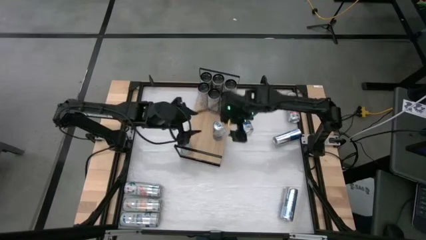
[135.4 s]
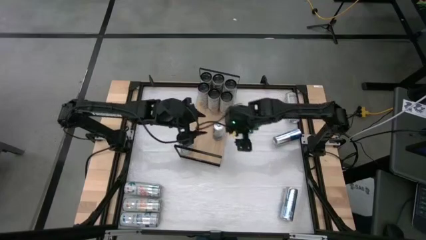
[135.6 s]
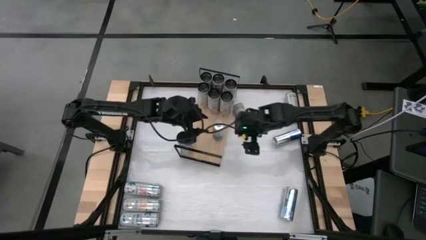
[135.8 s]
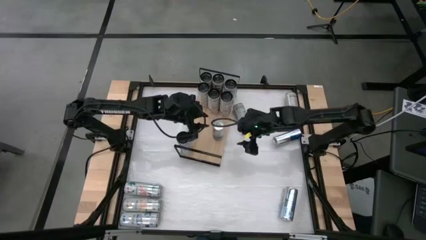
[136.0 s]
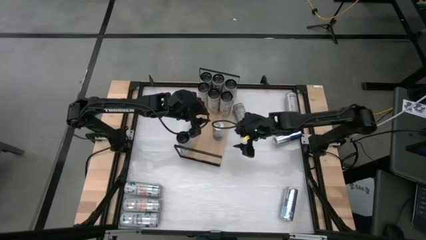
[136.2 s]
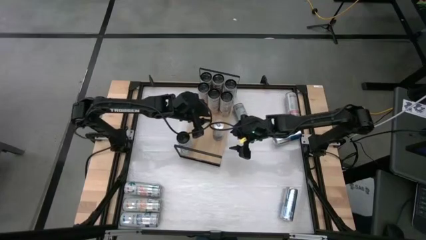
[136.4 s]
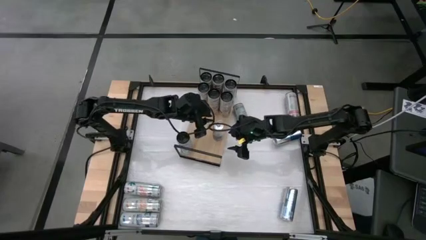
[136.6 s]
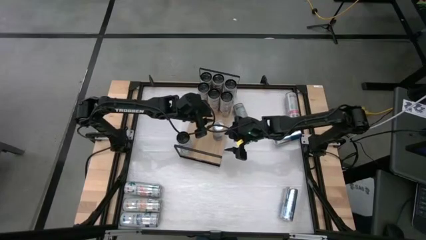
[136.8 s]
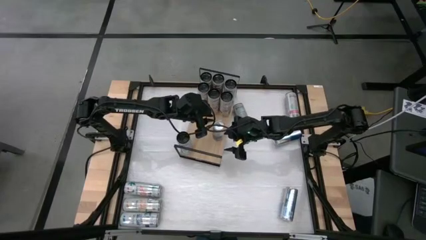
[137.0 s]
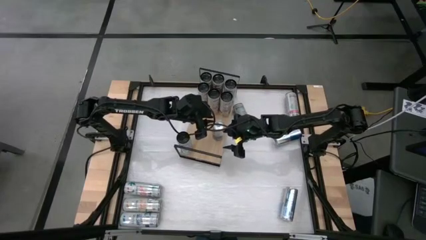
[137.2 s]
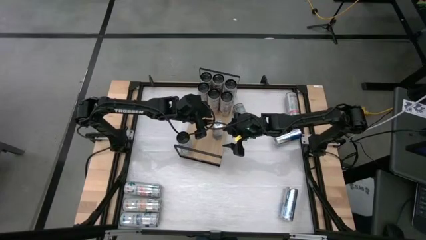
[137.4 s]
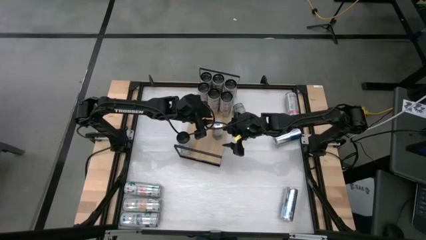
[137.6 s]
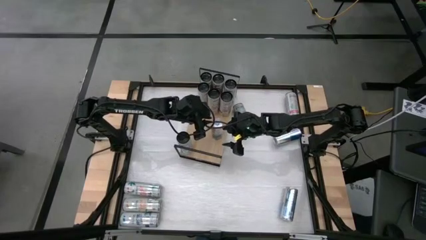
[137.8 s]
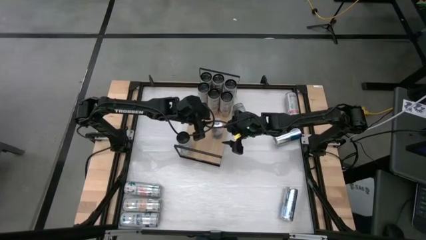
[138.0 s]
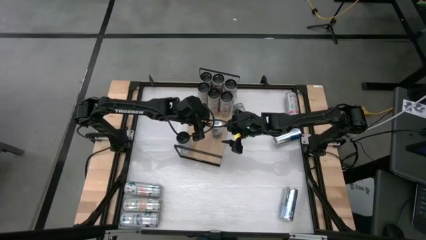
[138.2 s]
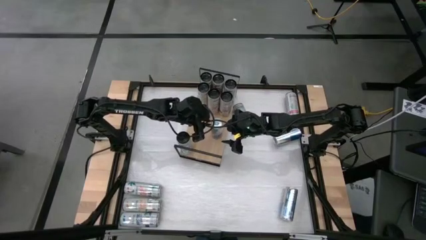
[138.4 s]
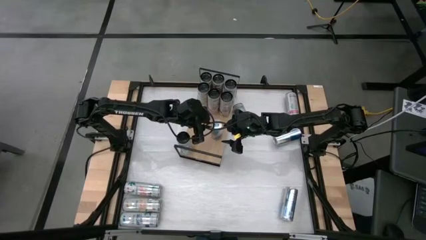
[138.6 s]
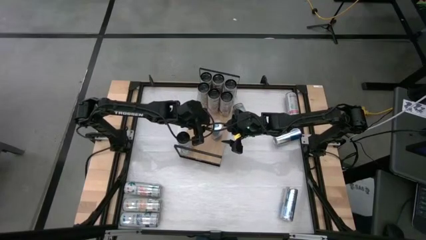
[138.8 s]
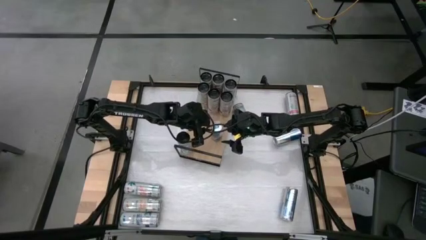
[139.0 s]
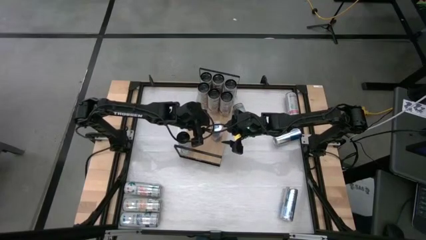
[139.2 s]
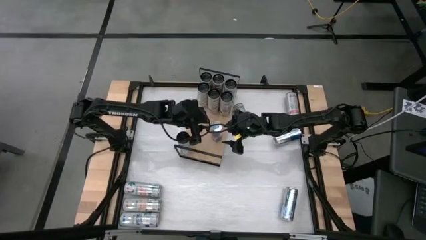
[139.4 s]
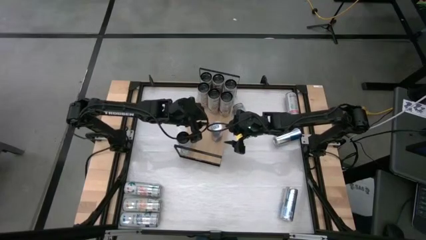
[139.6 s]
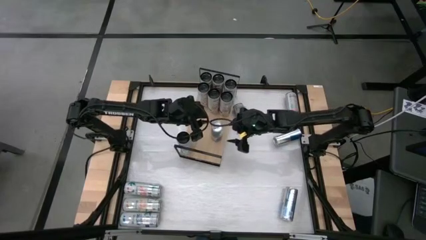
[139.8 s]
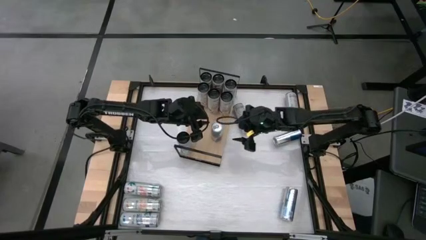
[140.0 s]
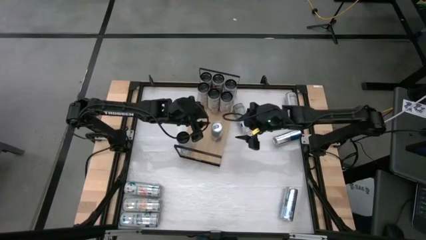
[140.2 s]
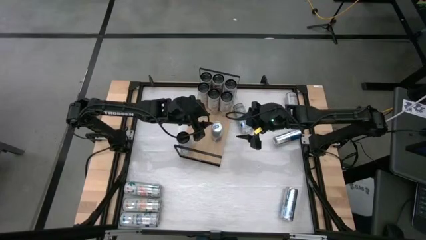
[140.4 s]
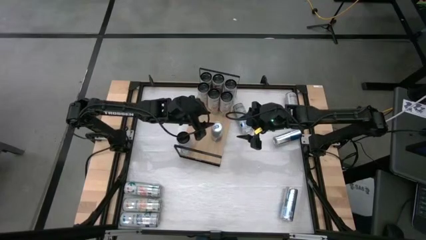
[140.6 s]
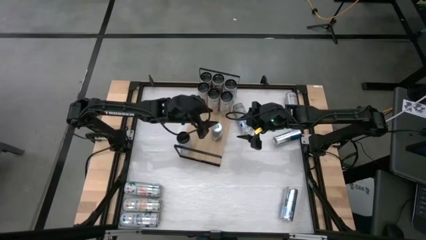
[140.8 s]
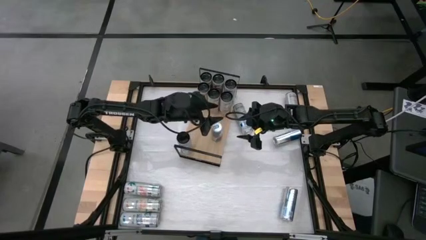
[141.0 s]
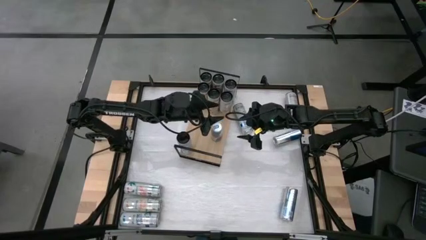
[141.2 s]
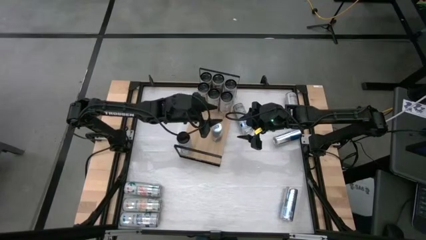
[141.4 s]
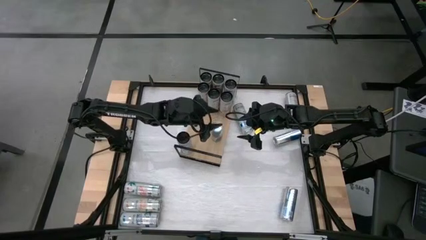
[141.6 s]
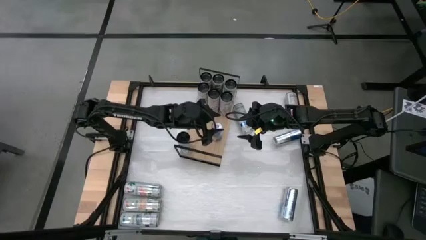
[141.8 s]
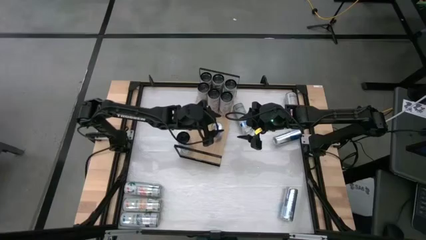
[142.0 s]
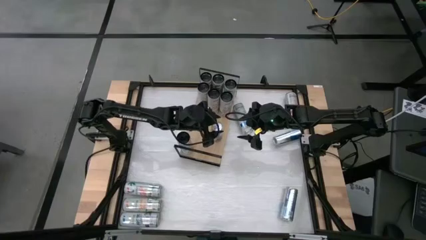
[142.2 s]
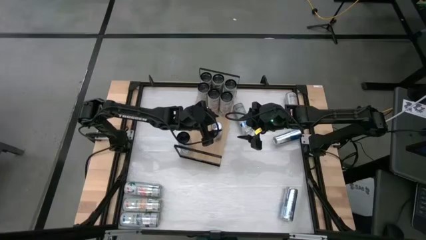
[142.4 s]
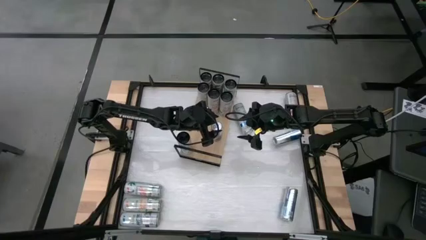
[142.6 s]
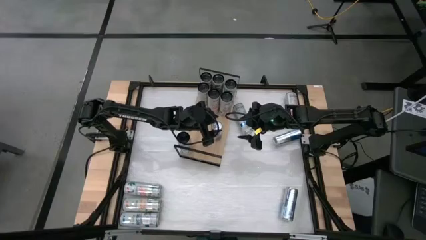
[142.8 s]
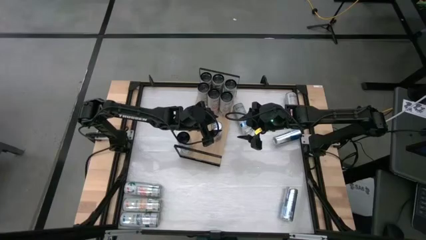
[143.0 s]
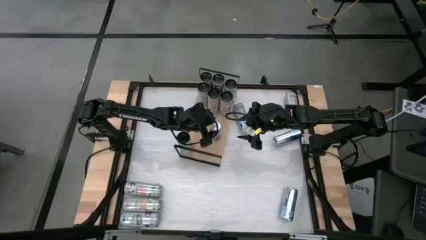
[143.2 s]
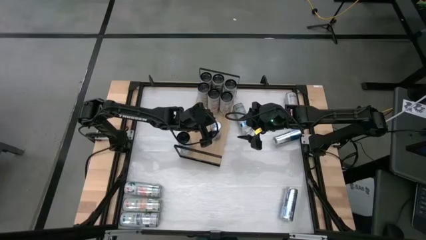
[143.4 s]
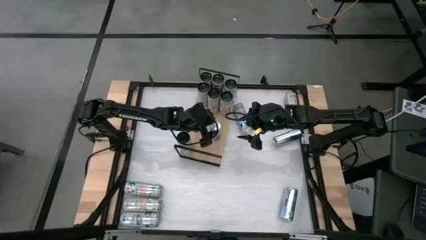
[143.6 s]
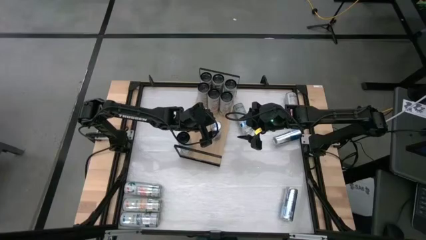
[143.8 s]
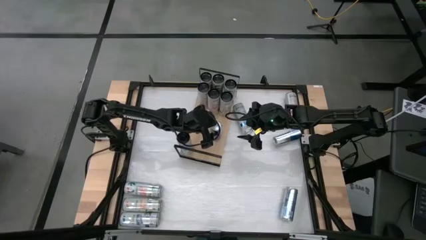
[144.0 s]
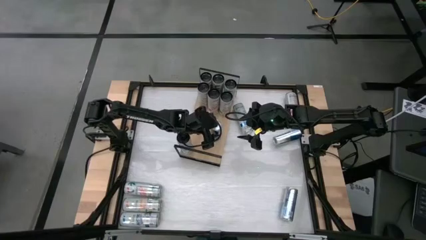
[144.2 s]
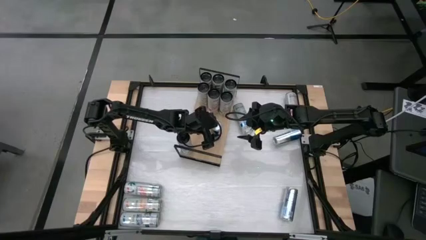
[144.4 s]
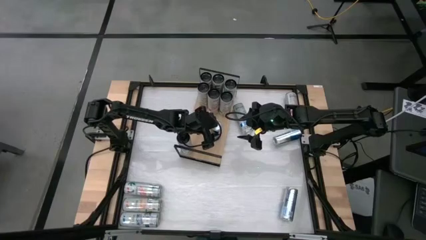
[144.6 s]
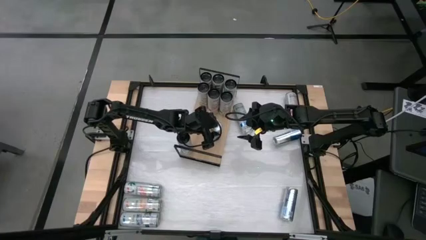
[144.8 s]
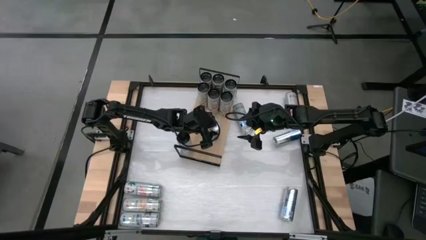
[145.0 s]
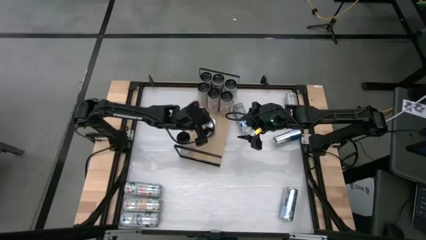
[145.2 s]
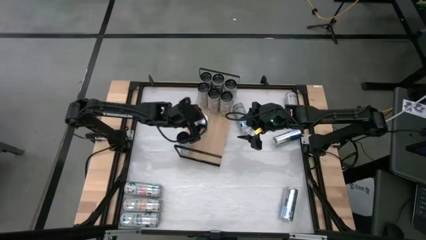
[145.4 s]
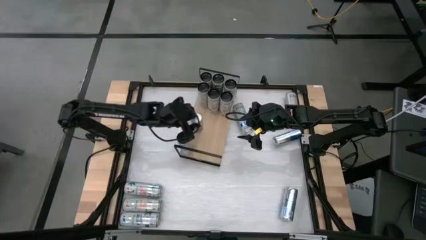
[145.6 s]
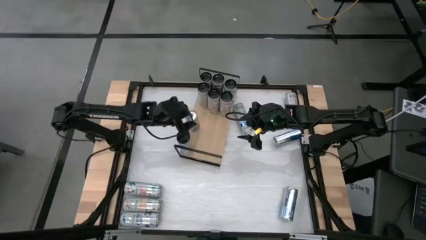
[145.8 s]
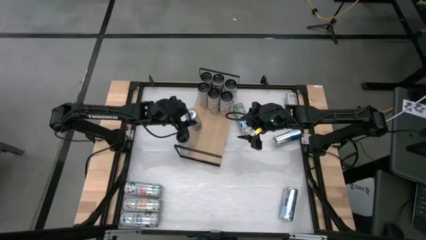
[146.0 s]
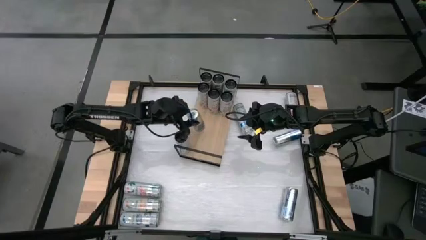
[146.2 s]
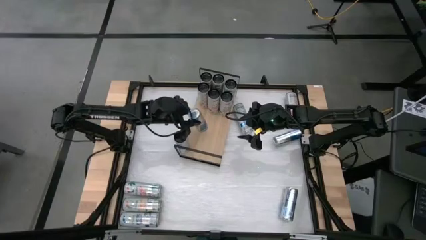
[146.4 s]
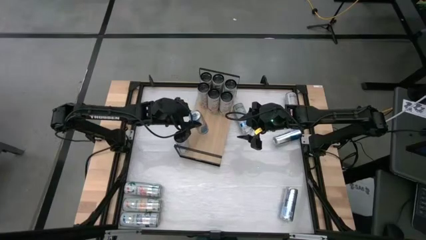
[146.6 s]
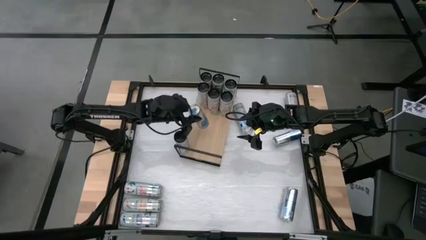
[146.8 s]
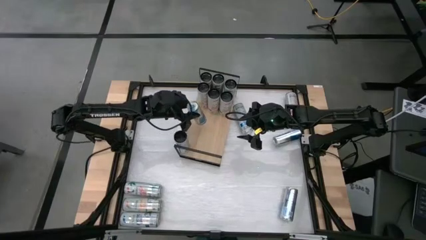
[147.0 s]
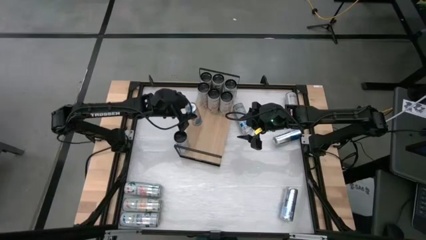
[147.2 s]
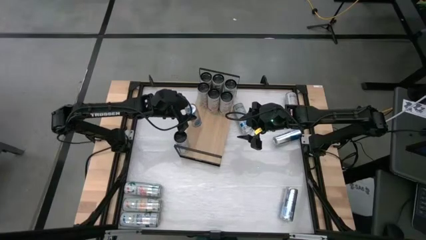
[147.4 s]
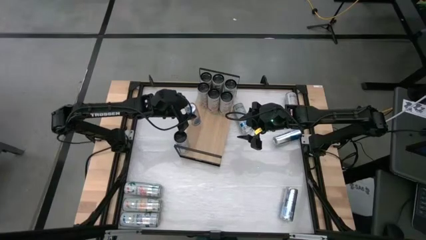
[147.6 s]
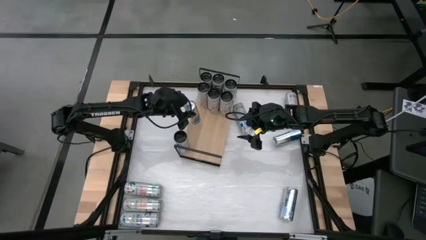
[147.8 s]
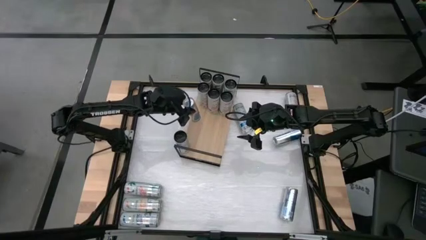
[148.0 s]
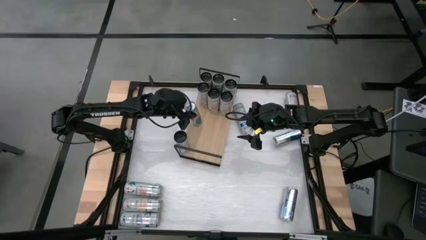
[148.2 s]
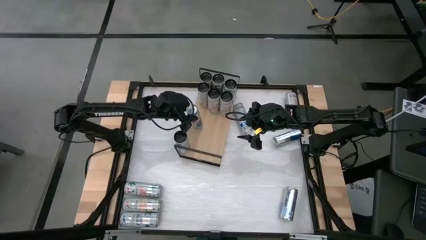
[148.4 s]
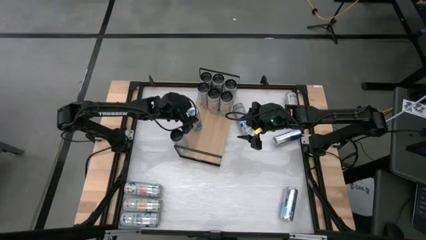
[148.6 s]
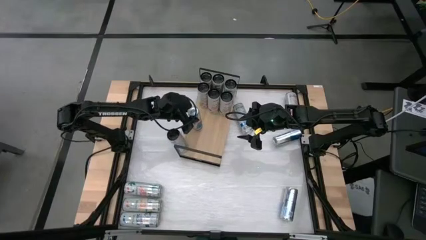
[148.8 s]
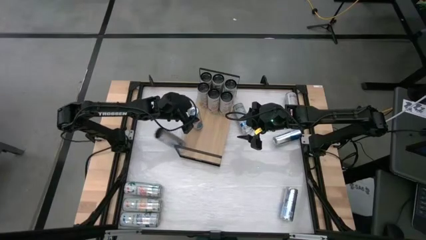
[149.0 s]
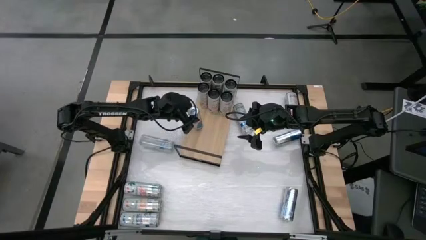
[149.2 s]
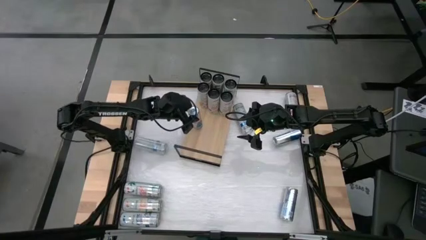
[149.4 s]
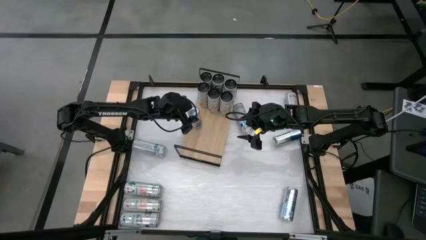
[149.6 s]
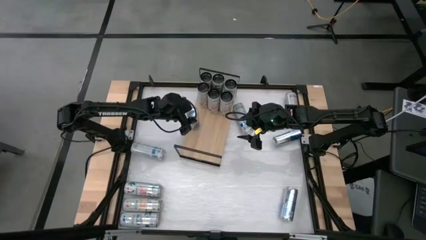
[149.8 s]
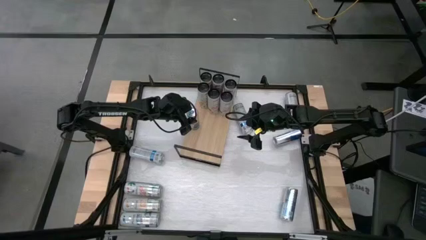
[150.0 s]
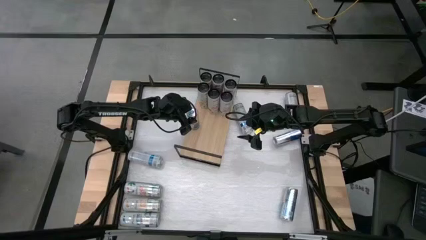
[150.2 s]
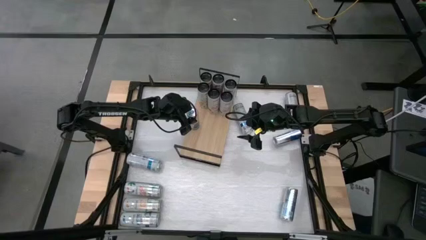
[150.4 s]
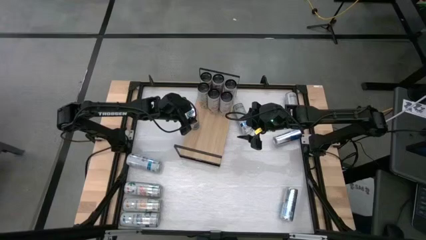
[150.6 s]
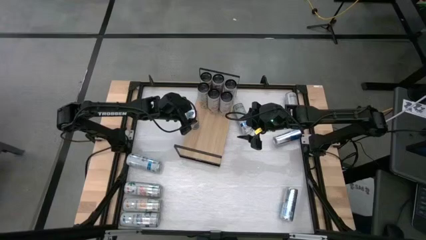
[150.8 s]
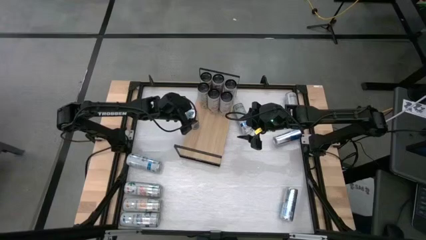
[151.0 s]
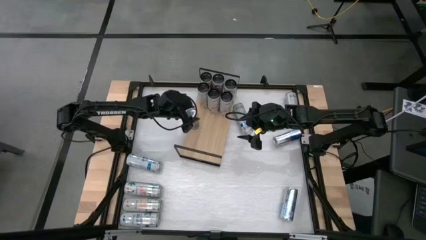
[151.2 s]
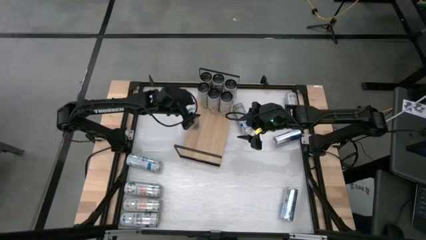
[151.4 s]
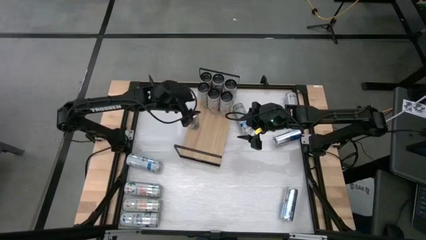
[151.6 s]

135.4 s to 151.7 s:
Task: Place canned beverage on shelf
Adjust the silver soda can
